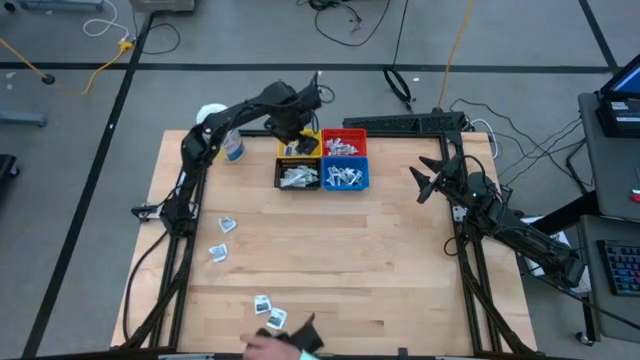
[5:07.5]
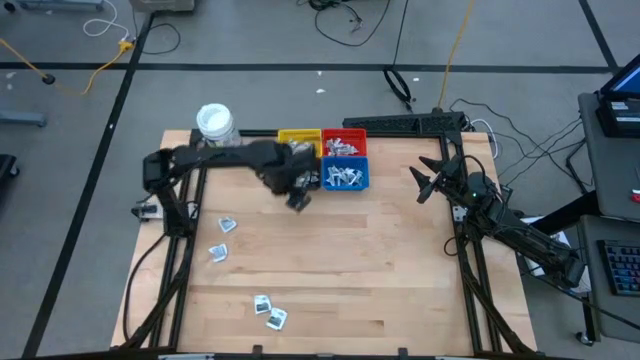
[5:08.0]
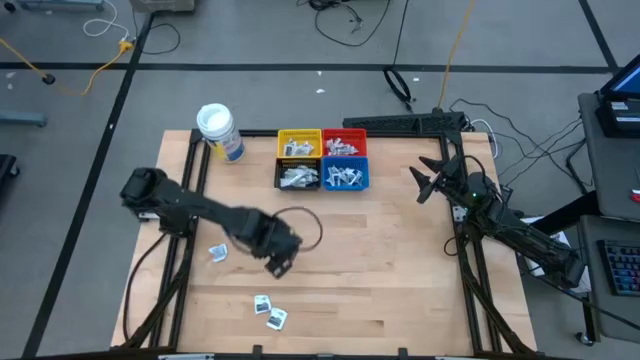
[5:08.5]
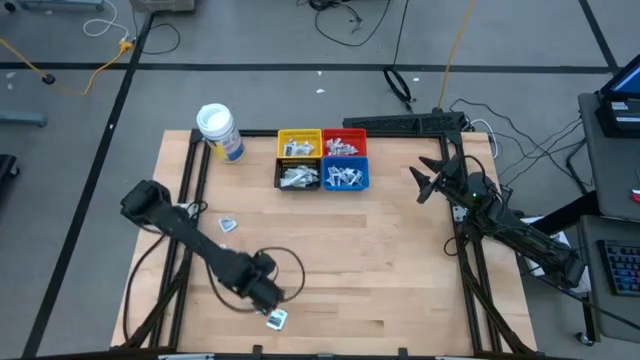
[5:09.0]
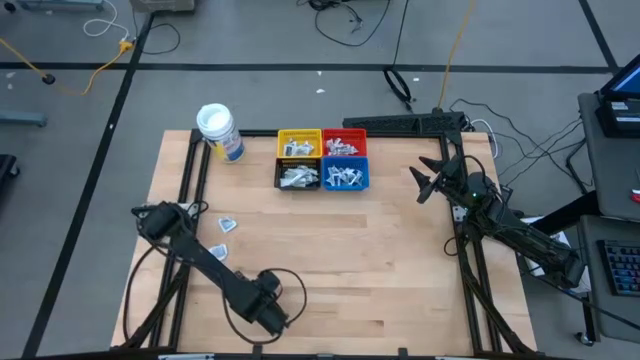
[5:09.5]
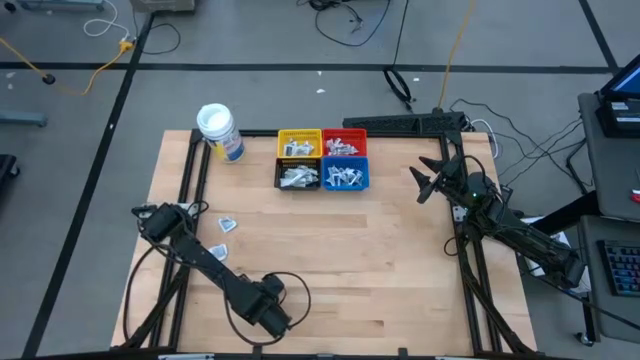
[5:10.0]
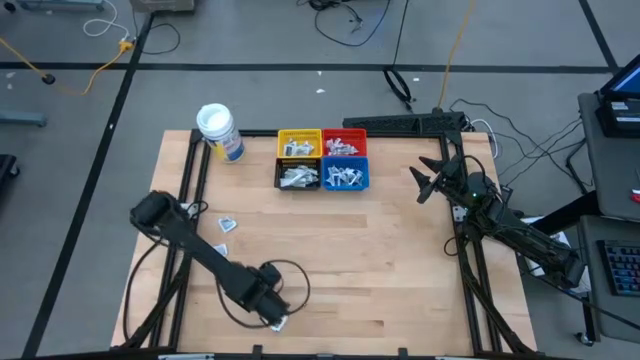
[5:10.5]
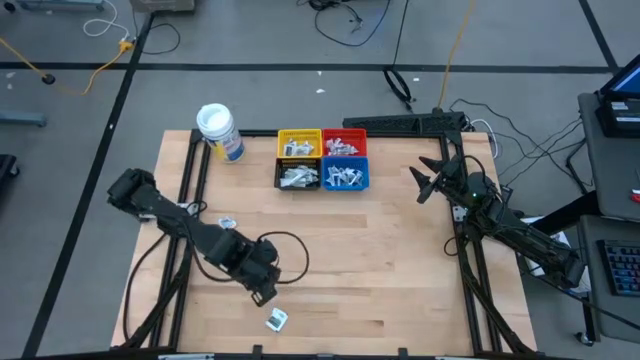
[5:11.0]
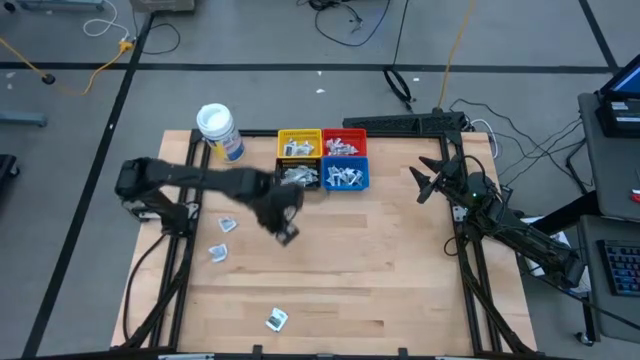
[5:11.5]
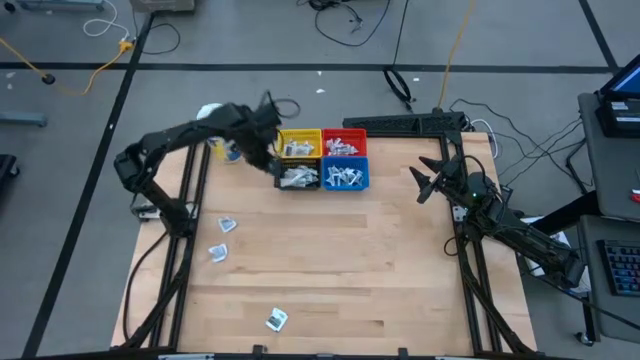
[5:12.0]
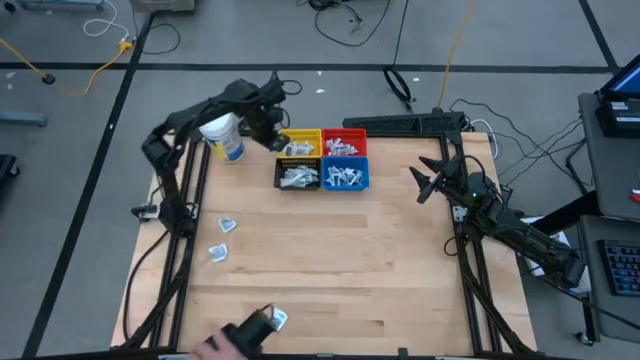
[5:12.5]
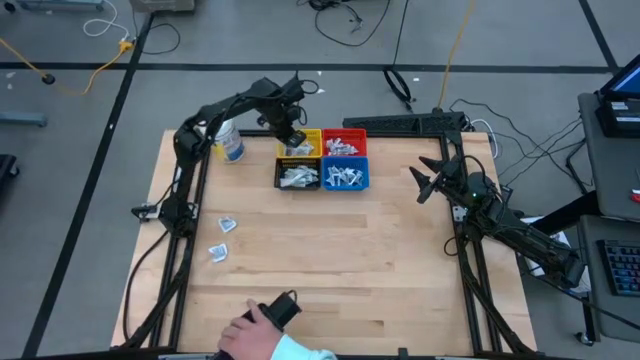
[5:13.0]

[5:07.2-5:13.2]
Task: Pick & Place First Aid Supplies
Put the gray towelette pack into the yellow basket

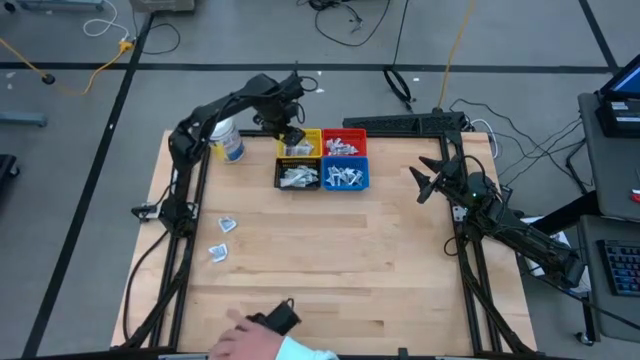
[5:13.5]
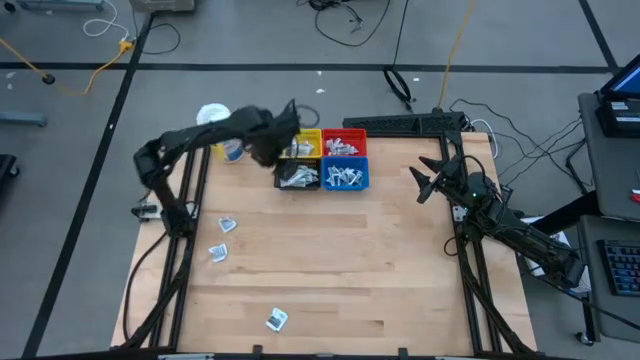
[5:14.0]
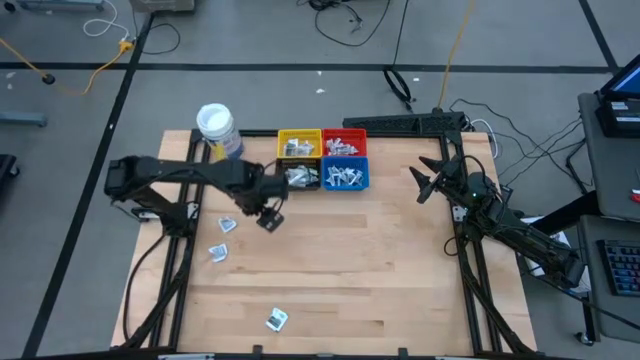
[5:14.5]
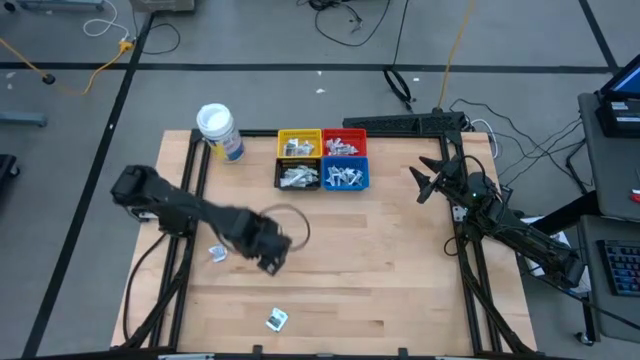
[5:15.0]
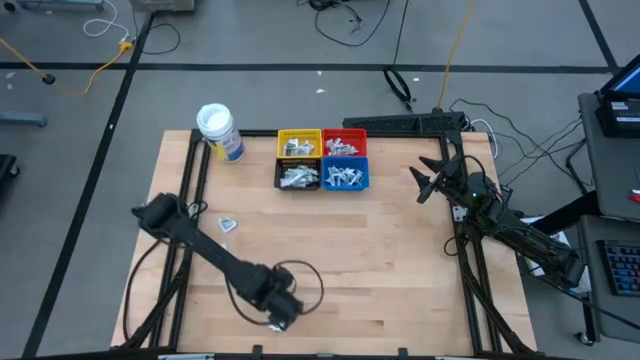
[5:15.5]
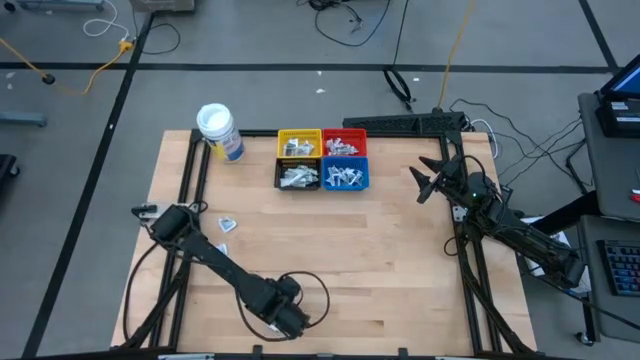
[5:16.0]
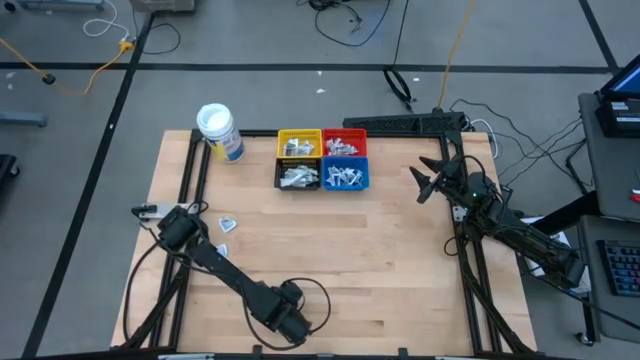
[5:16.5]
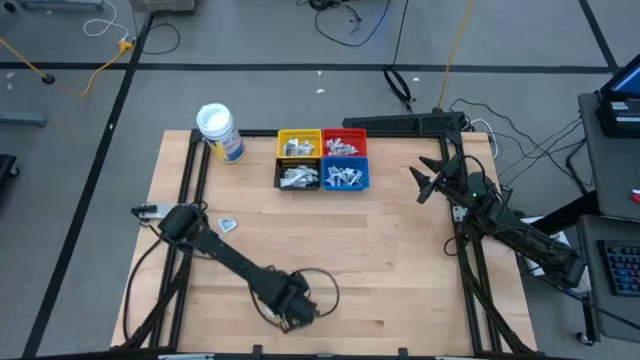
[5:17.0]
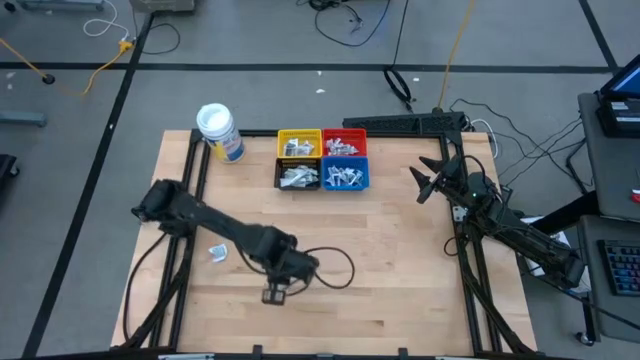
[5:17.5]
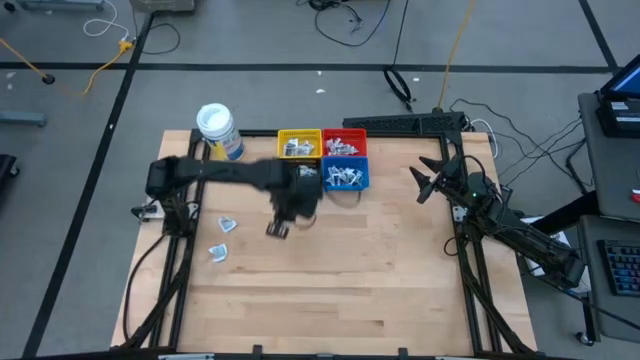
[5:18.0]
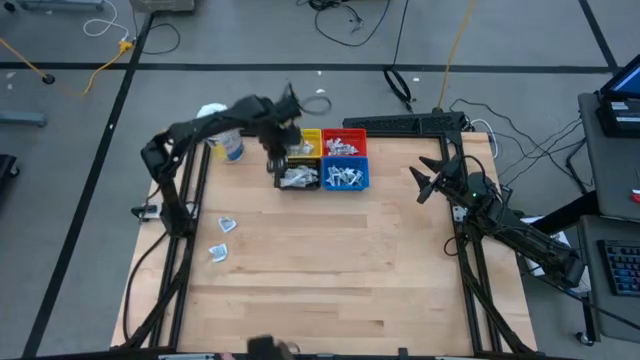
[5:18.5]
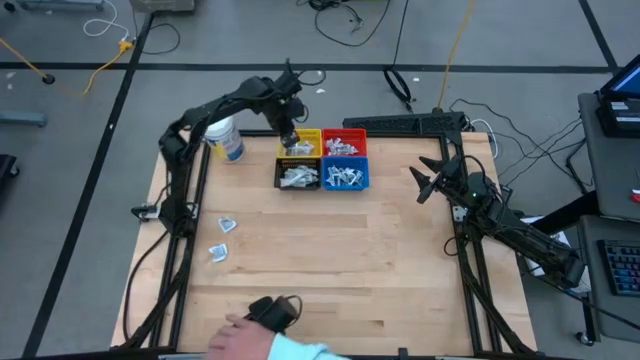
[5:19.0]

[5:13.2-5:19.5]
Put the gray towelette pack into the yellow basket

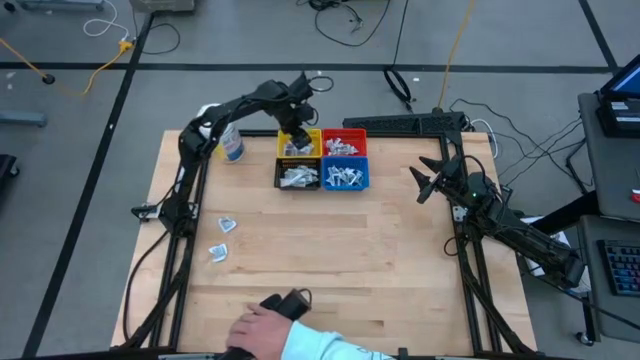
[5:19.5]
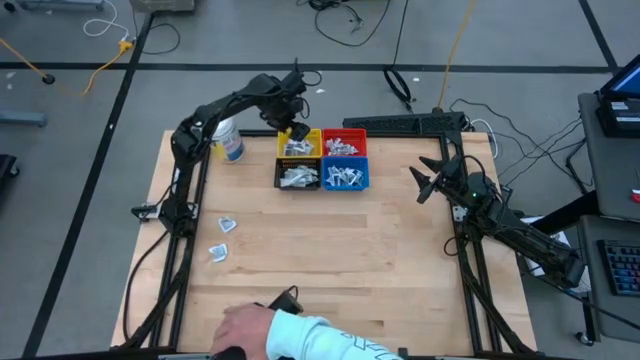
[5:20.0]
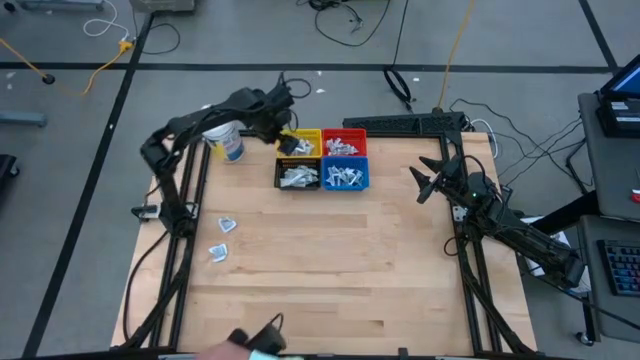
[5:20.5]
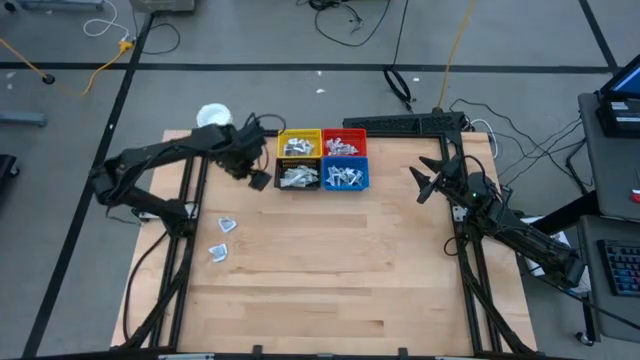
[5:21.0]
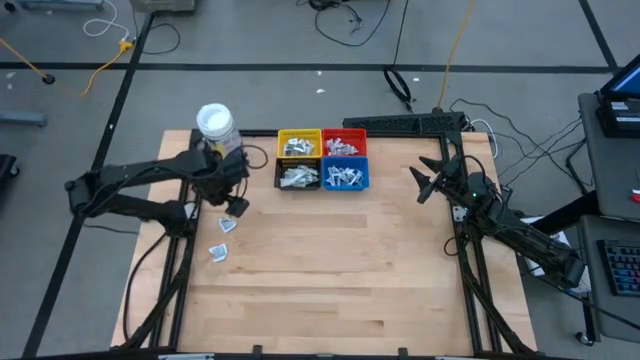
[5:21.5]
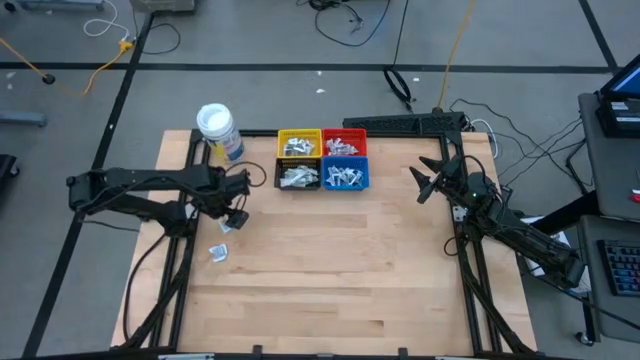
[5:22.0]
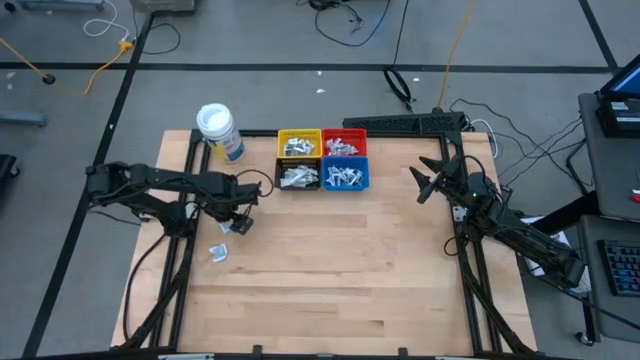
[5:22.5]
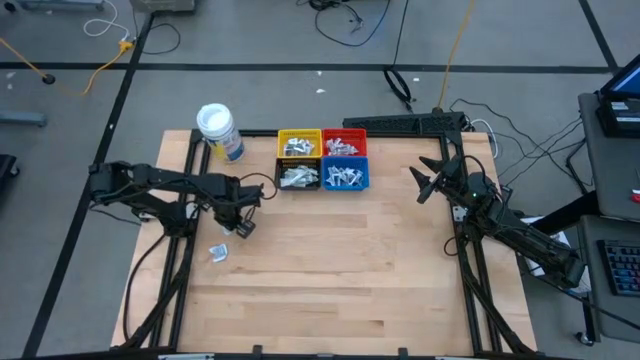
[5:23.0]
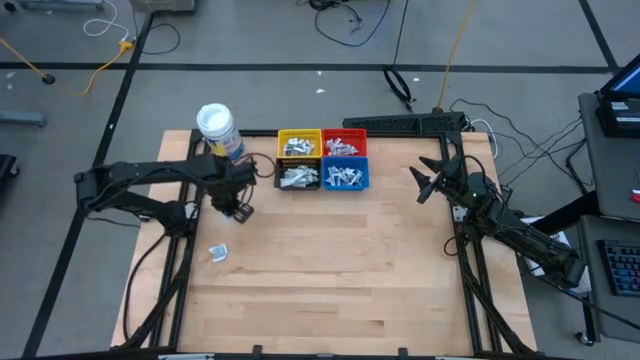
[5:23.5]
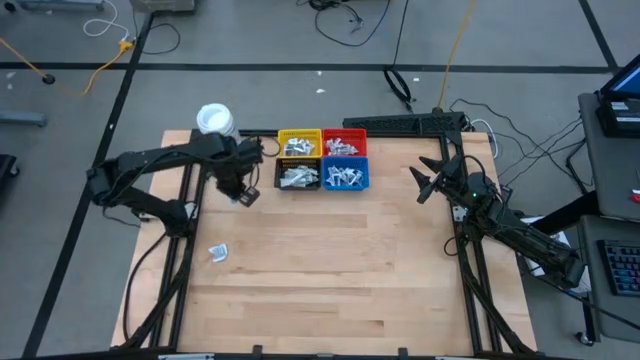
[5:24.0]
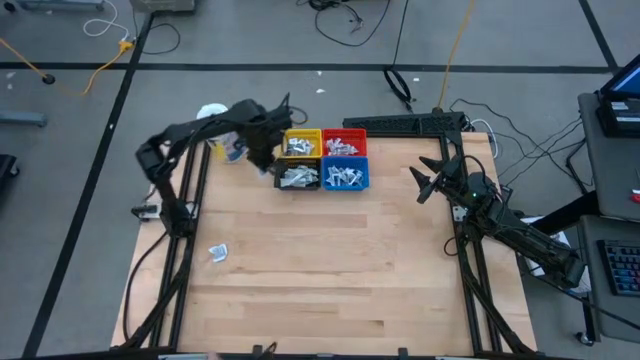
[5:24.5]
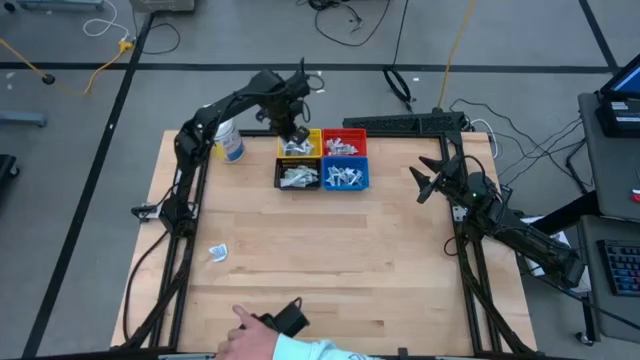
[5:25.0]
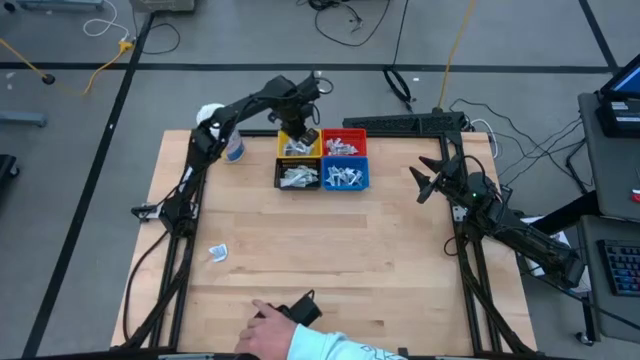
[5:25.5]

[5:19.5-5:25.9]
Put the gray towelette pack into the yellow basket

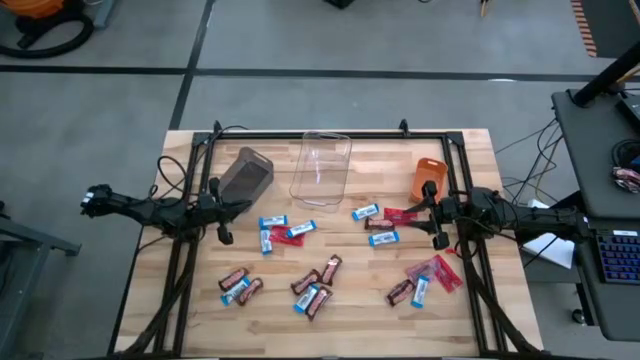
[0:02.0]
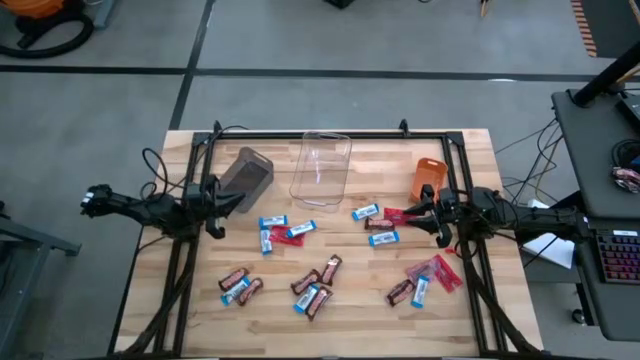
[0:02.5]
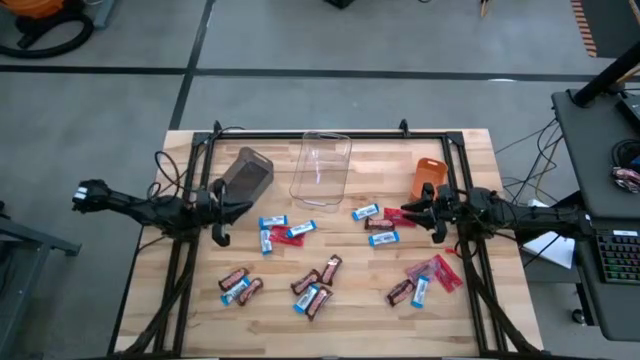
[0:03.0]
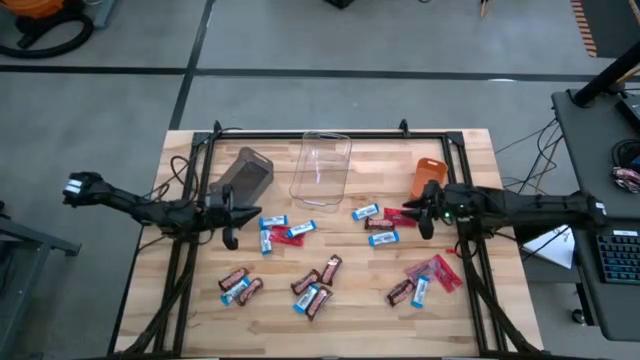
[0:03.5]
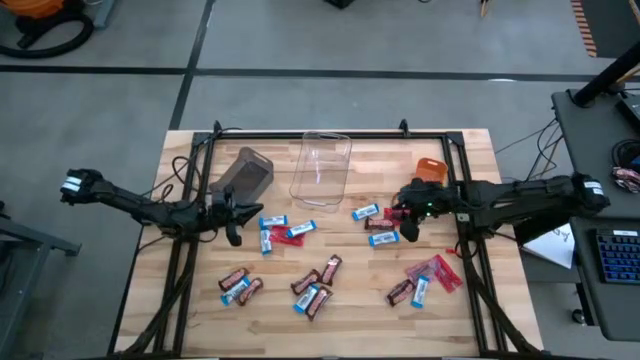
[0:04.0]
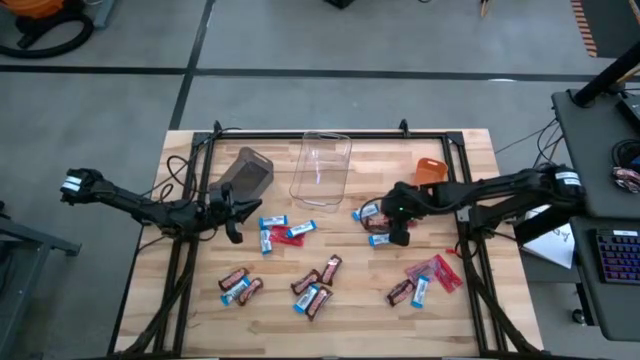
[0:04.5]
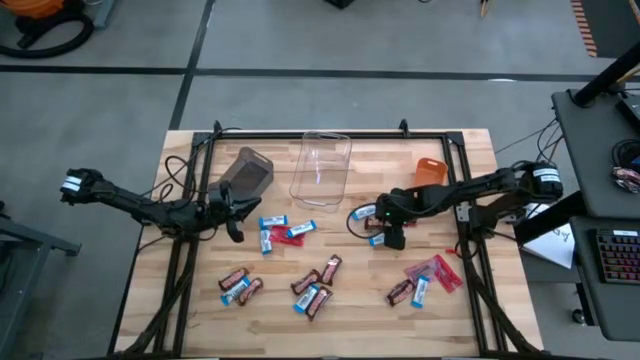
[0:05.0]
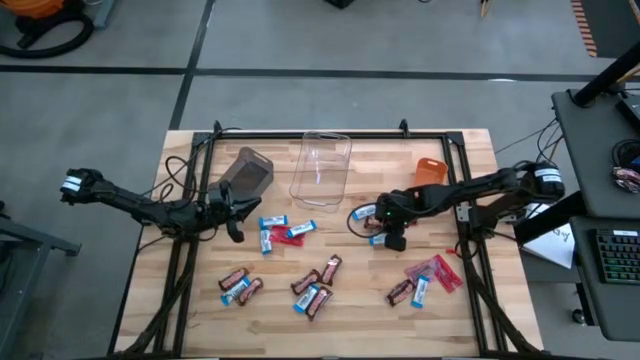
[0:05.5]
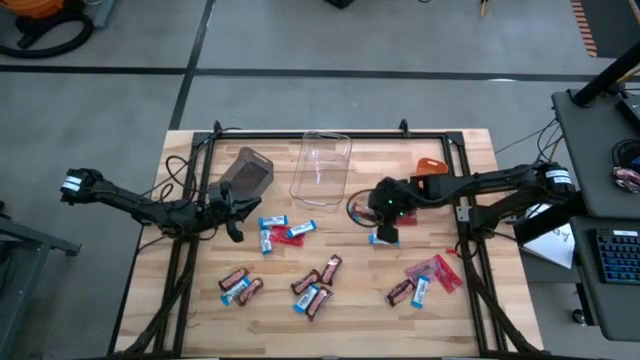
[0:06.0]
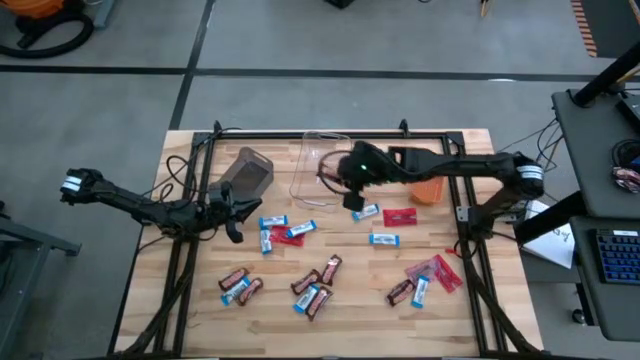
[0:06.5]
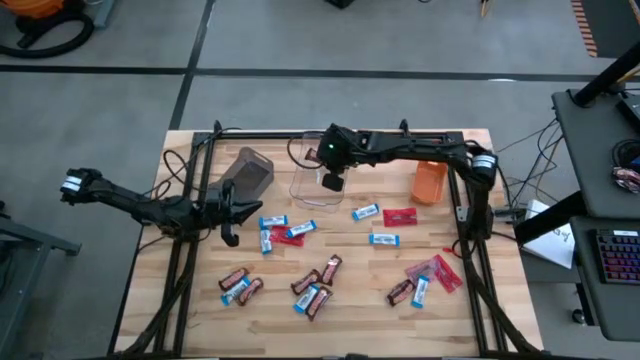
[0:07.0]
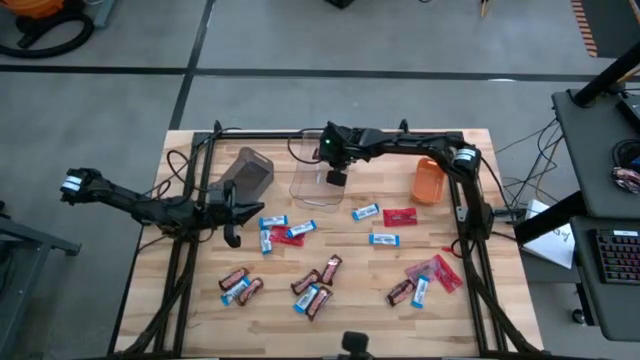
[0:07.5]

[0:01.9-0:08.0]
Task: Sort candy
Put the brown chocolate into the transparent bin
